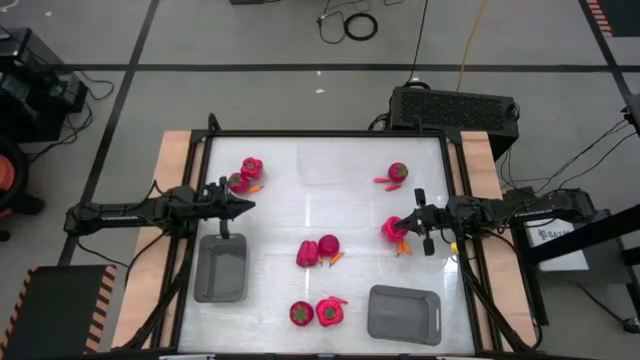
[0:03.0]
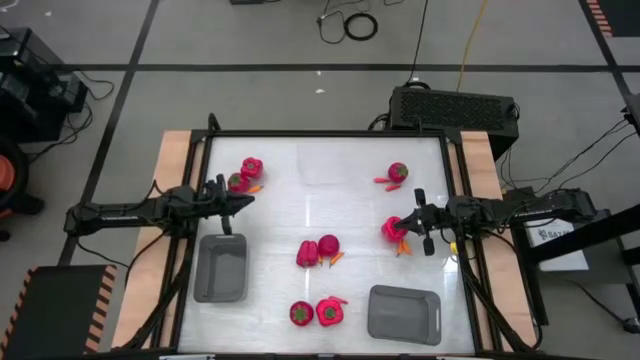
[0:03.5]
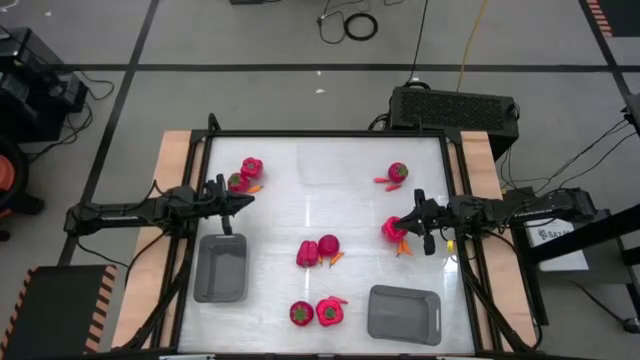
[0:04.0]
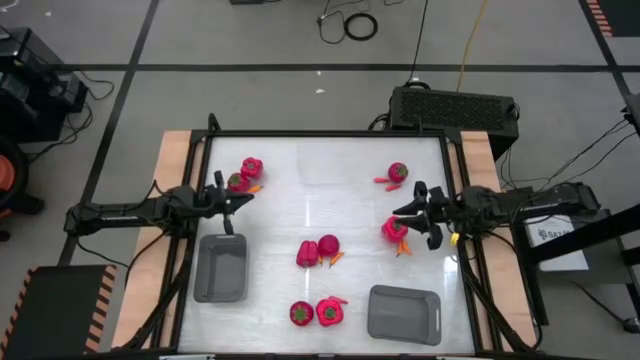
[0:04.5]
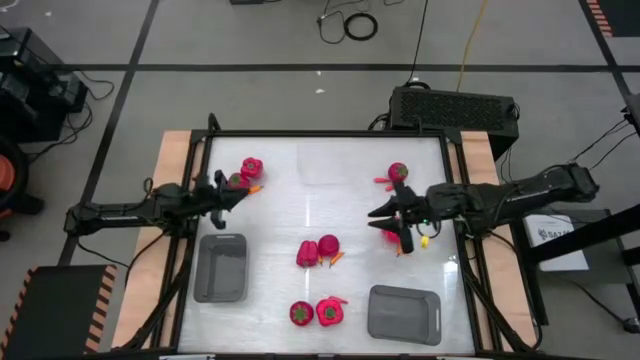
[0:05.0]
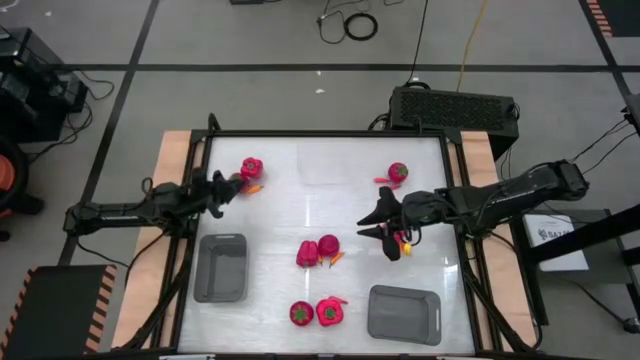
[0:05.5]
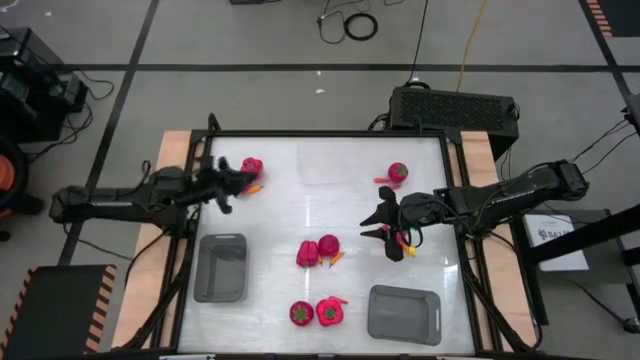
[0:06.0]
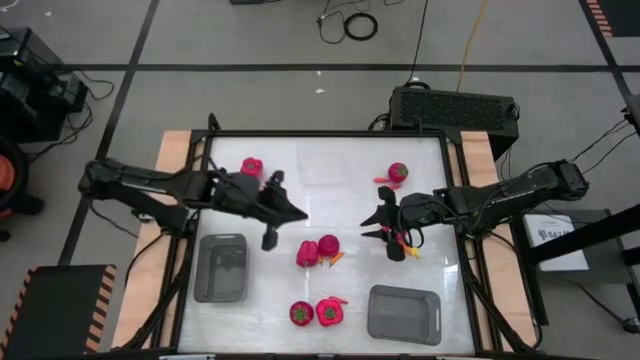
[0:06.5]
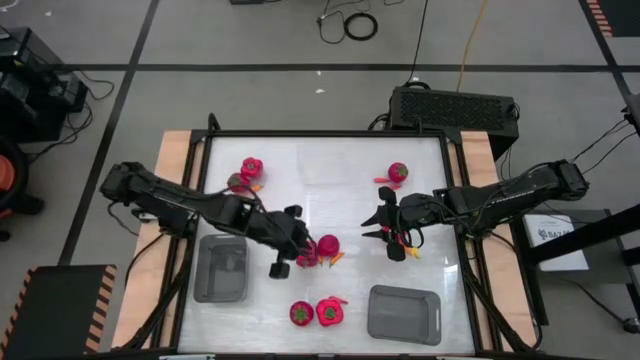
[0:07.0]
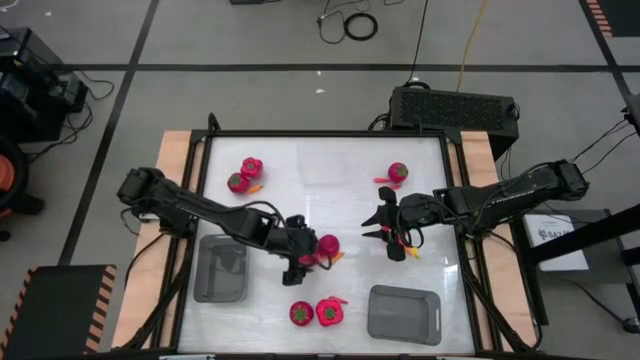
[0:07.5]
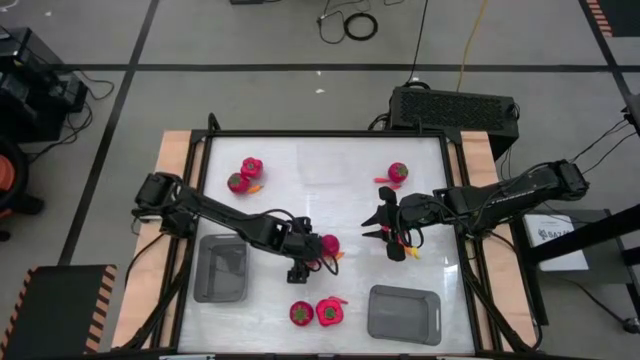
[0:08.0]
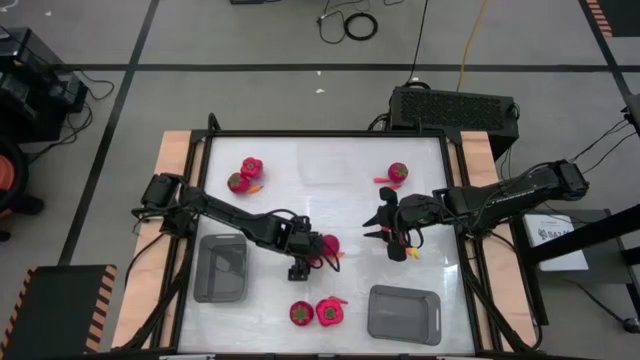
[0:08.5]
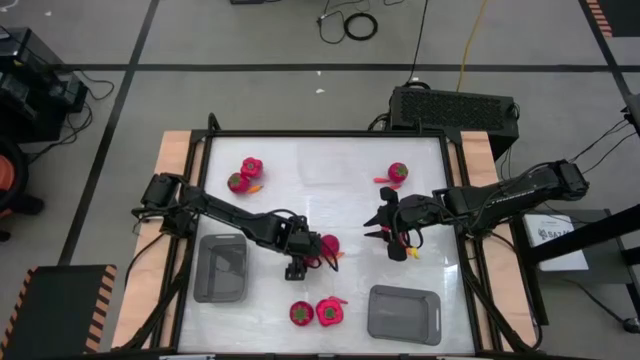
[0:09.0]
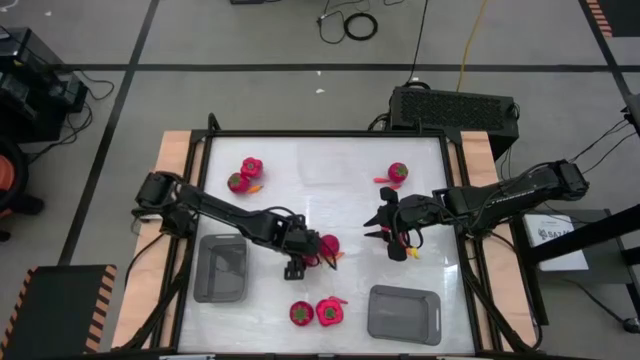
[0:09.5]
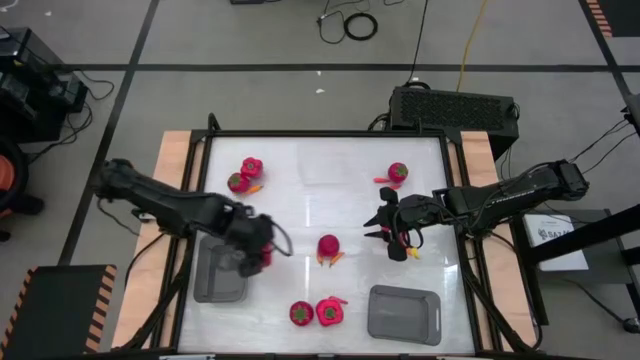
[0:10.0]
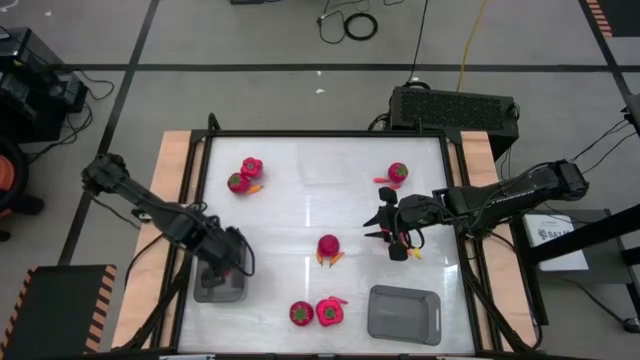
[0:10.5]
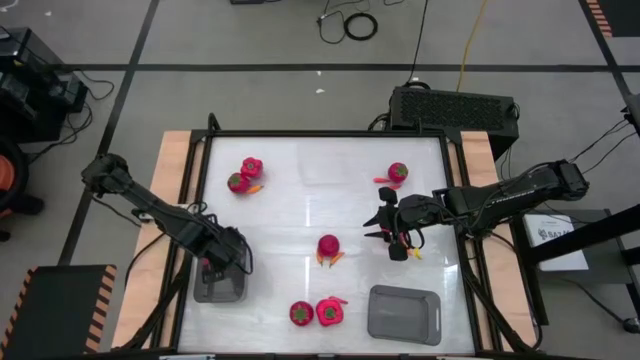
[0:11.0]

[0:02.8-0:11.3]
Task: Sort produce into baskets
Put the bell pepper into the left black bin

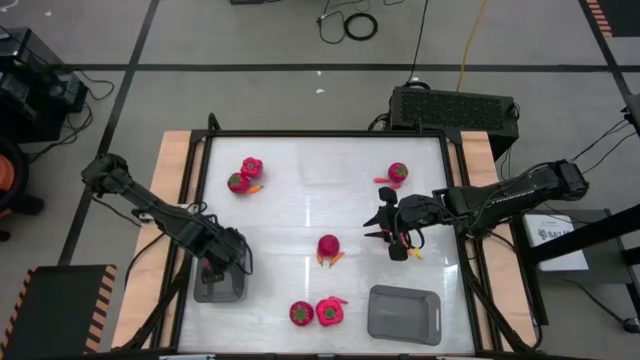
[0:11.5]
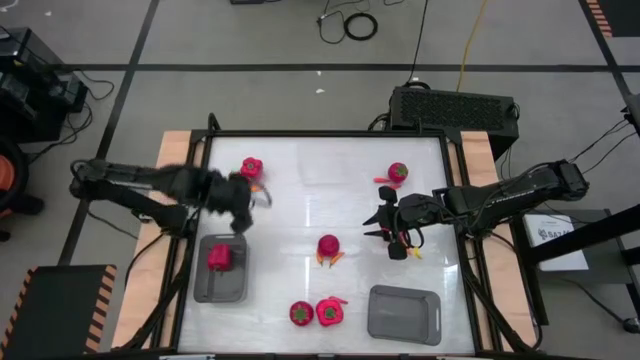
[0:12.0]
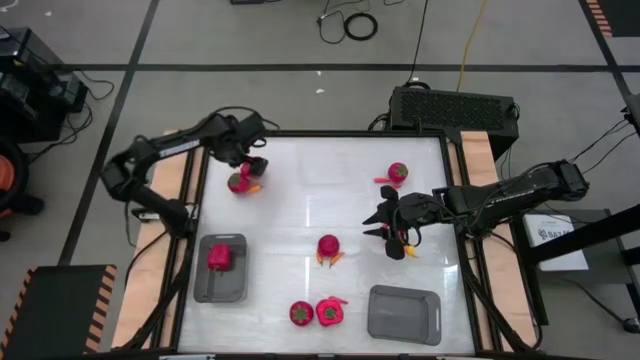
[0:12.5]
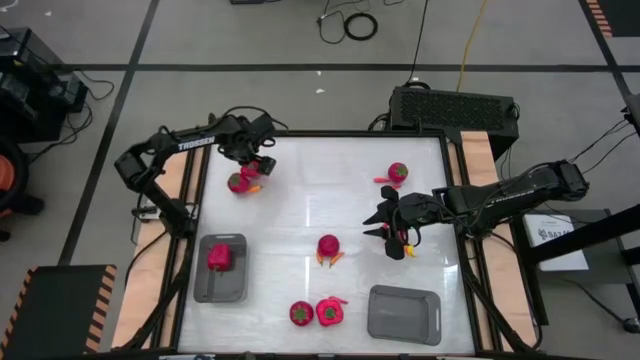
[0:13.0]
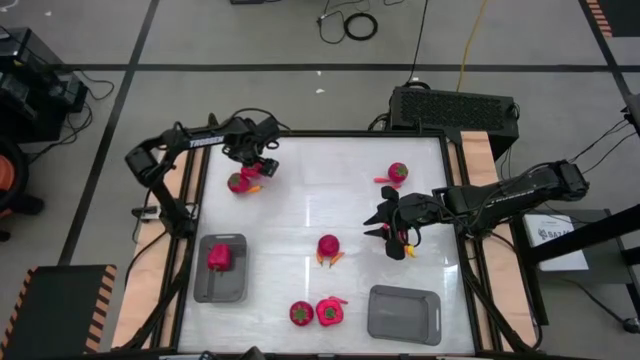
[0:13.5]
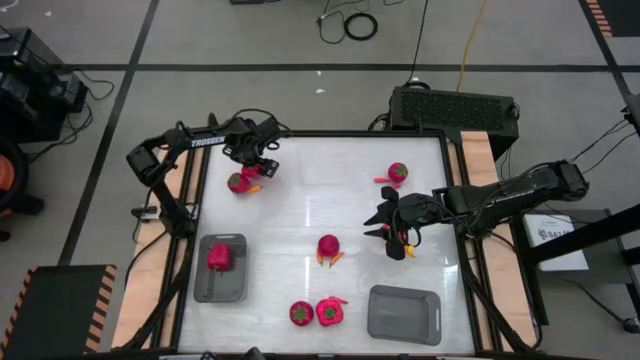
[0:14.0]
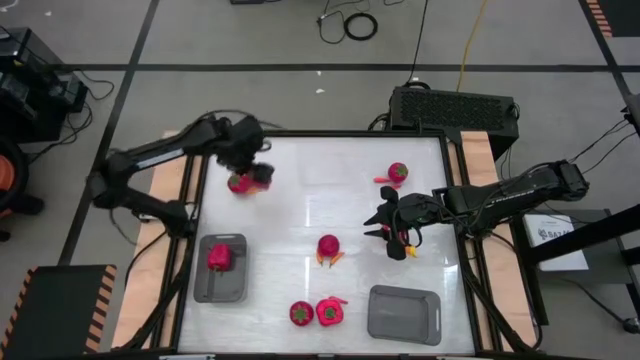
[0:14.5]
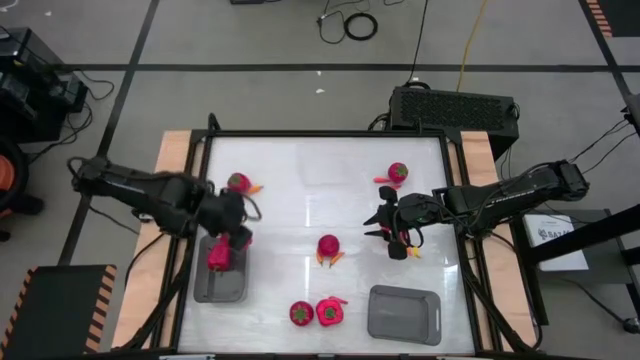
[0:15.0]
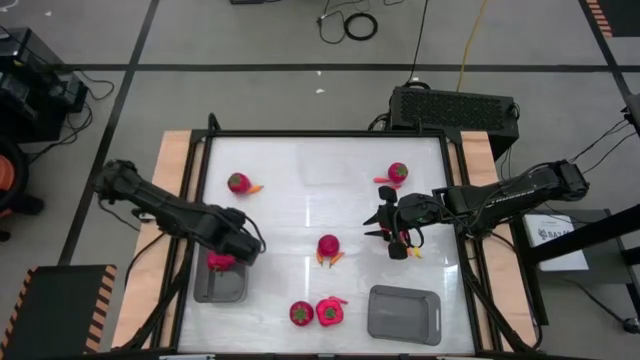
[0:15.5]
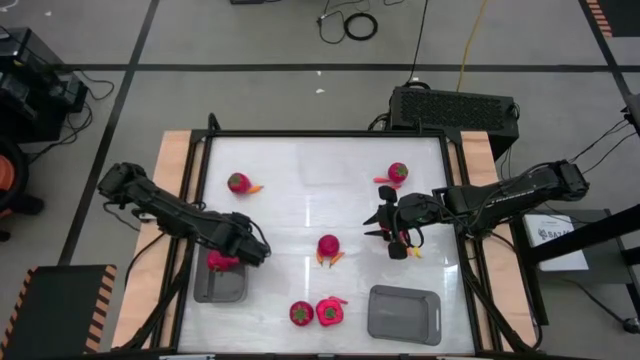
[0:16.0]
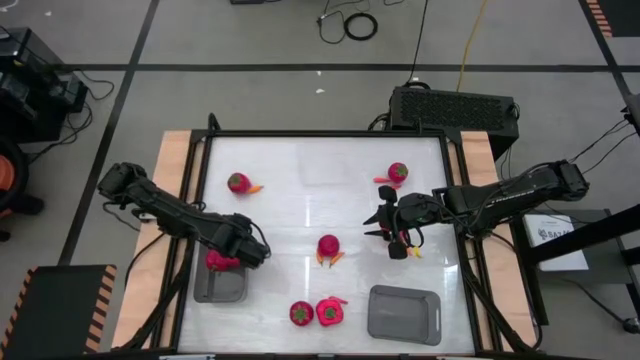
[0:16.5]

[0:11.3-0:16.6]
Put the bell pepper into the left black bin

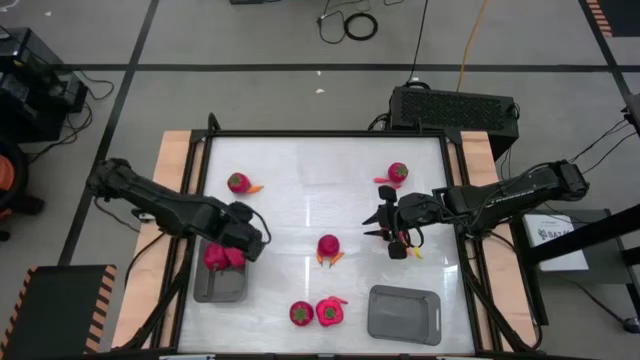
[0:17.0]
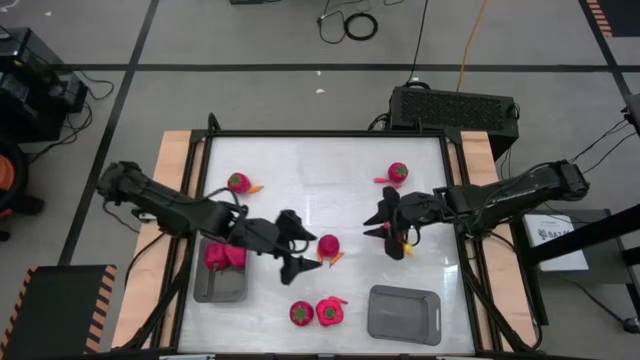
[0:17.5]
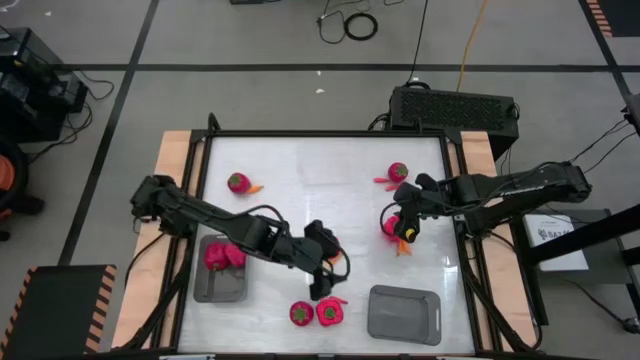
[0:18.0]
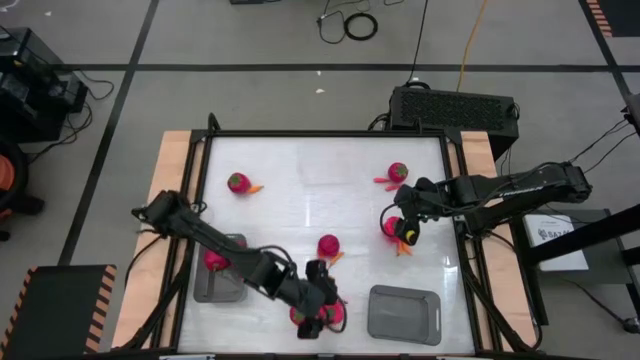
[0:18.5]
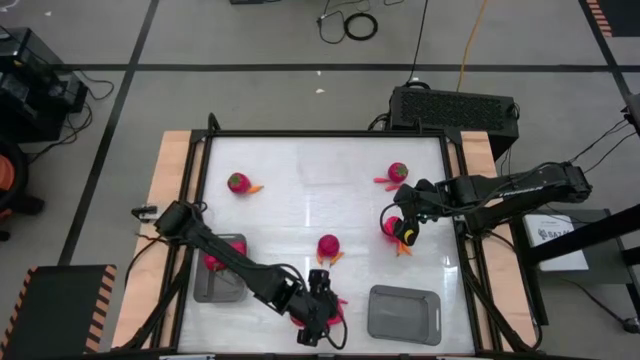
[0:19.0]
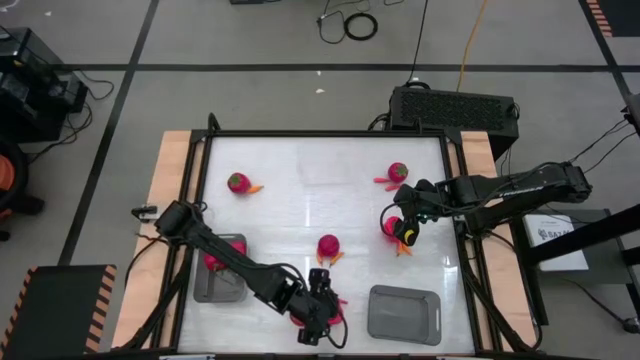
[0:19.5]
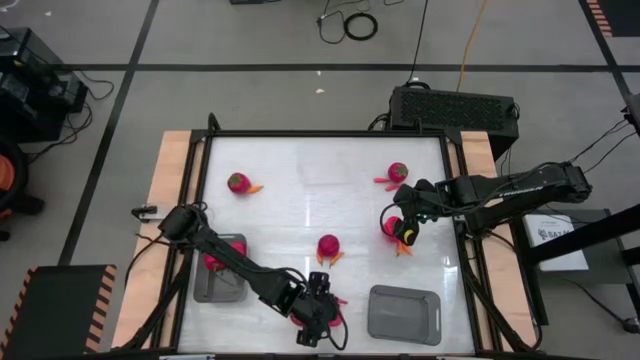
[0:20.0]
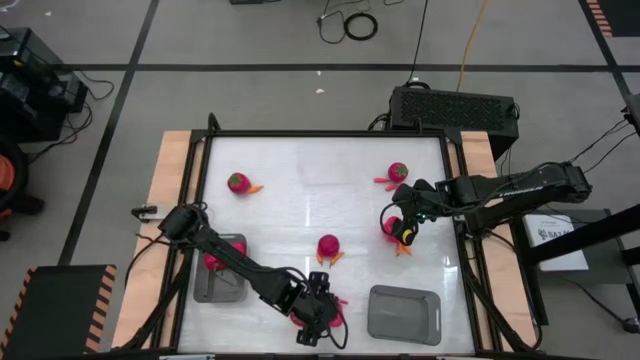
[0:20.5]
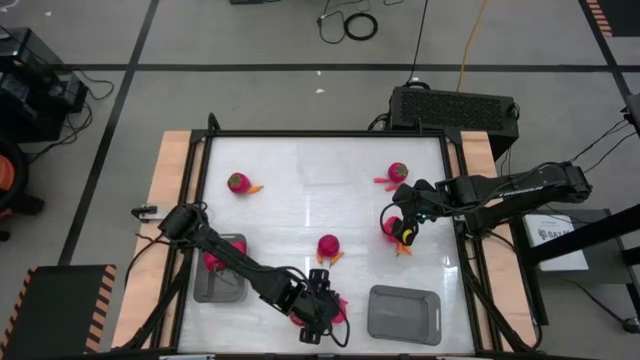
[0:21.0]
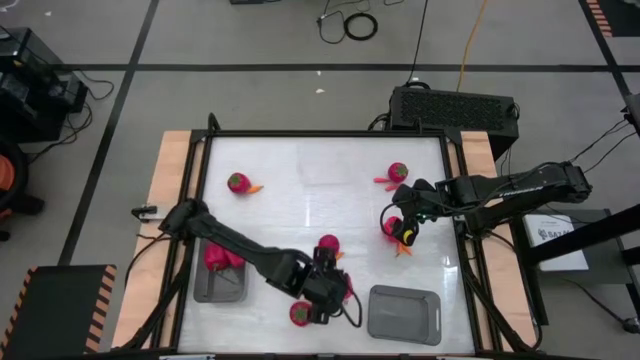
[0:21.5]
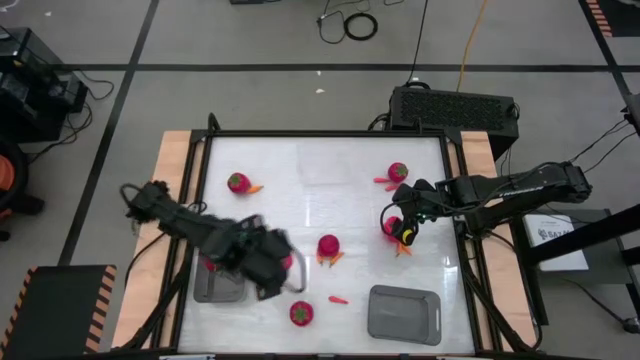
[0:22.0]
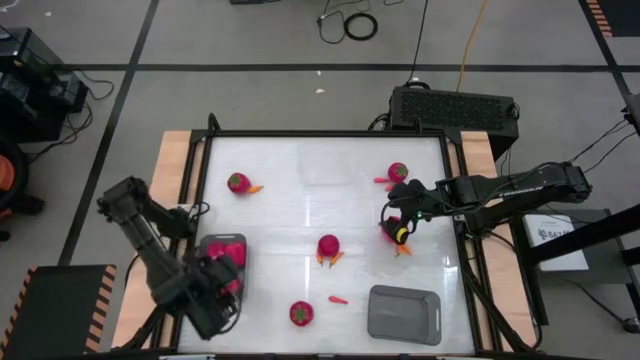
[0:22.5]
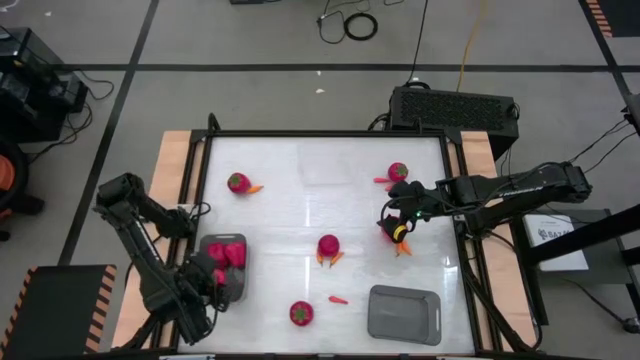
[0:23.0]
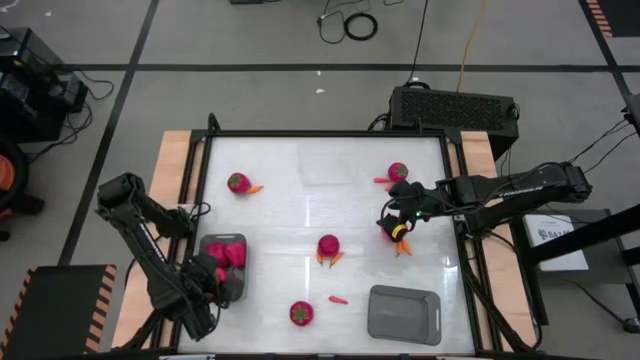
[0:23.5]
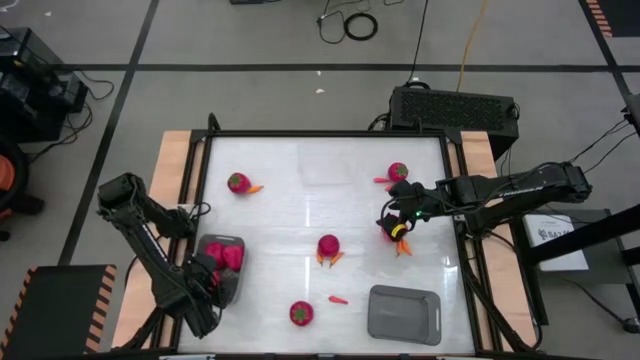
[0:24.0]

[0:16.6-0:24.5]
Put the bell pepper into the left black bin
